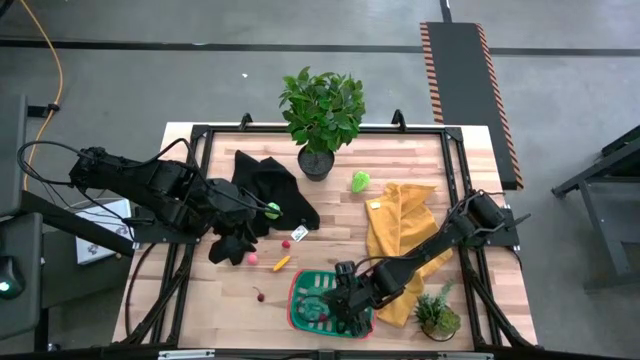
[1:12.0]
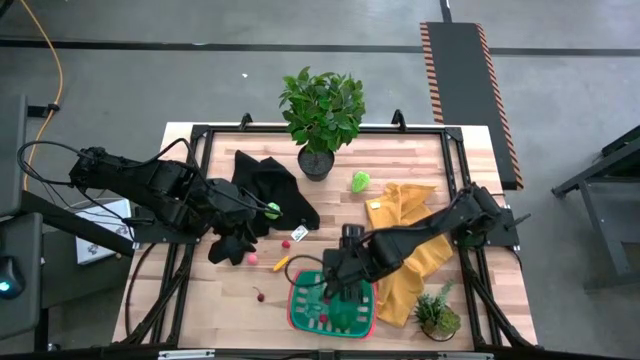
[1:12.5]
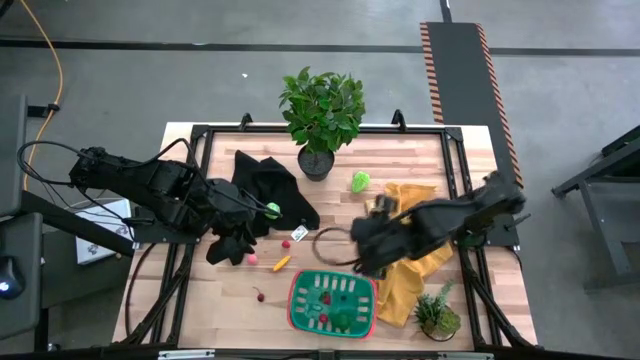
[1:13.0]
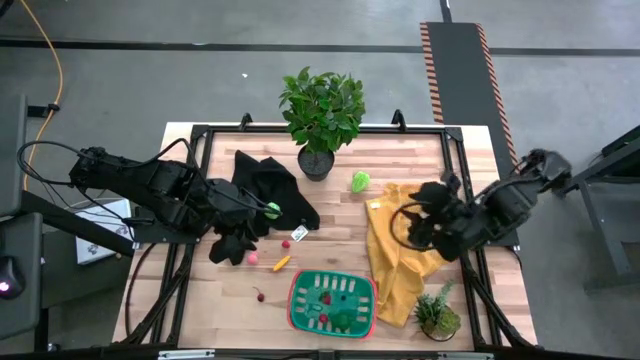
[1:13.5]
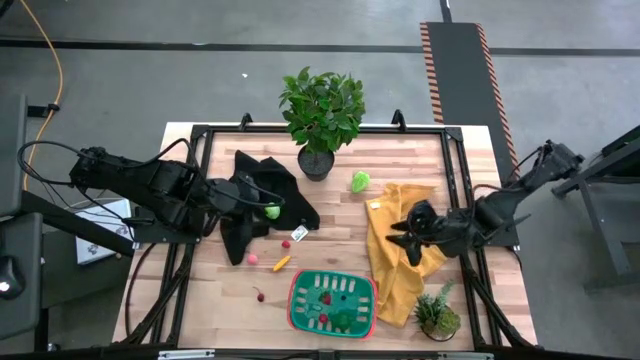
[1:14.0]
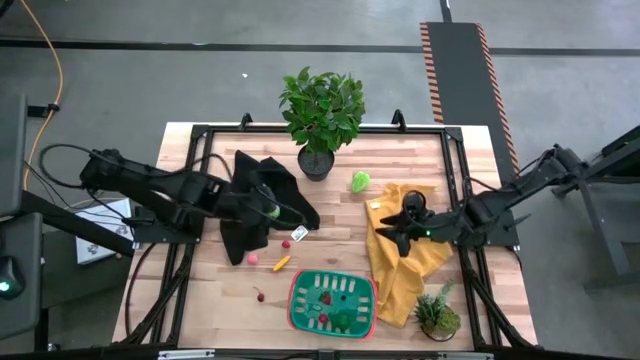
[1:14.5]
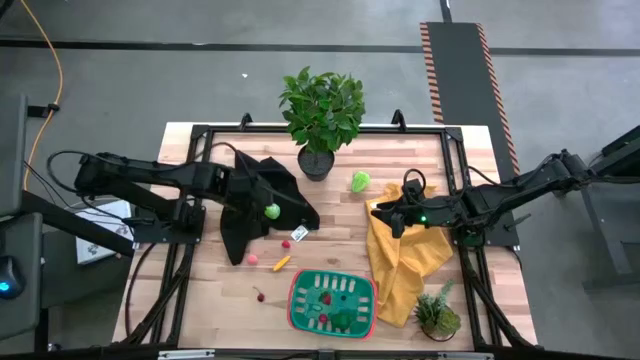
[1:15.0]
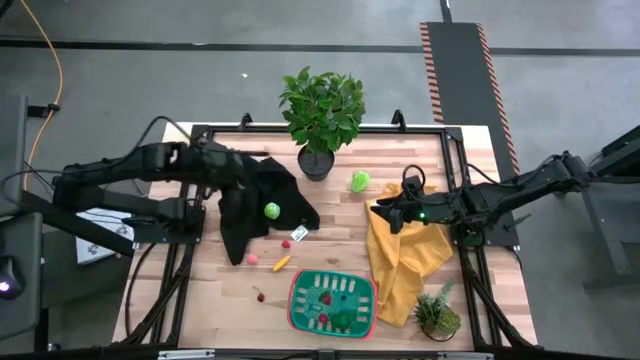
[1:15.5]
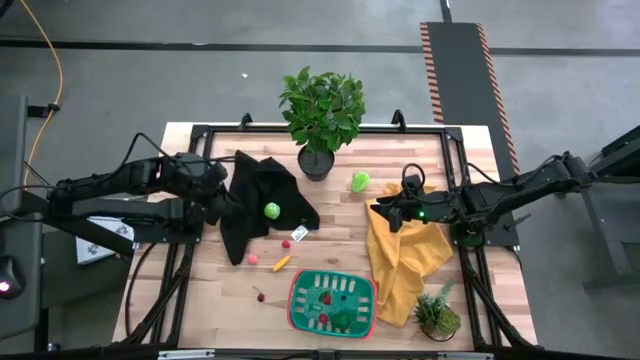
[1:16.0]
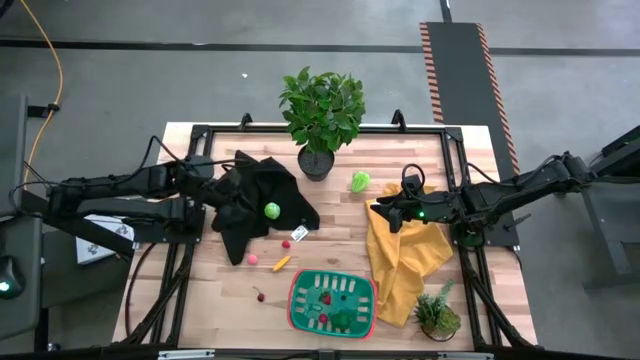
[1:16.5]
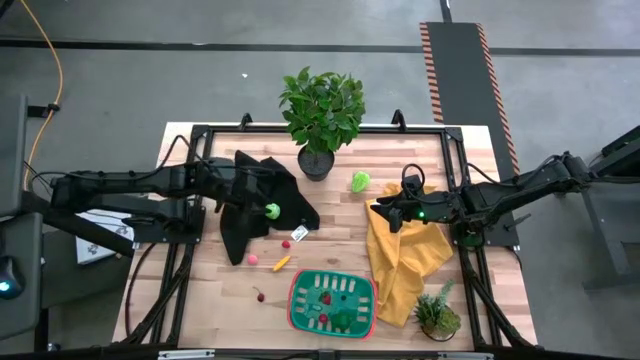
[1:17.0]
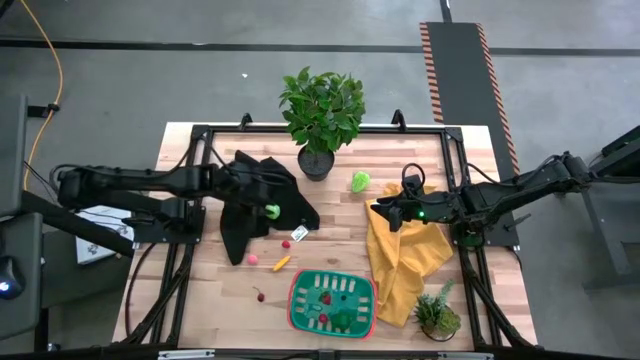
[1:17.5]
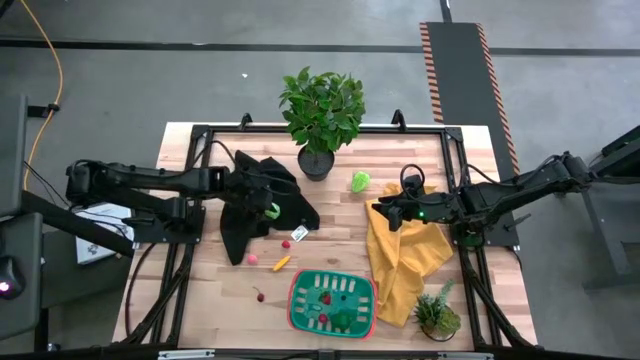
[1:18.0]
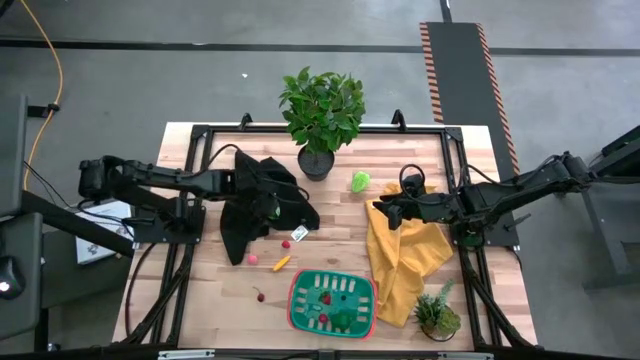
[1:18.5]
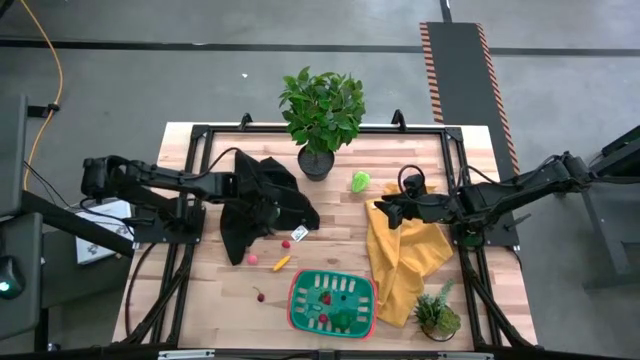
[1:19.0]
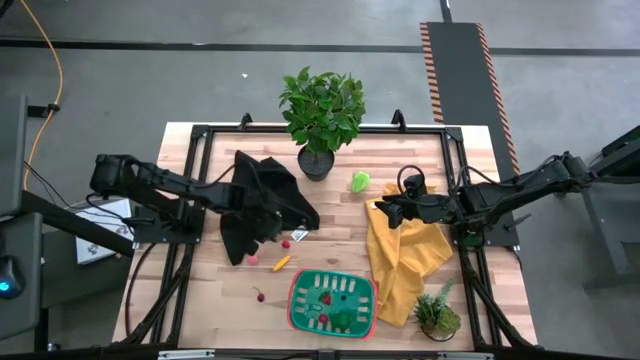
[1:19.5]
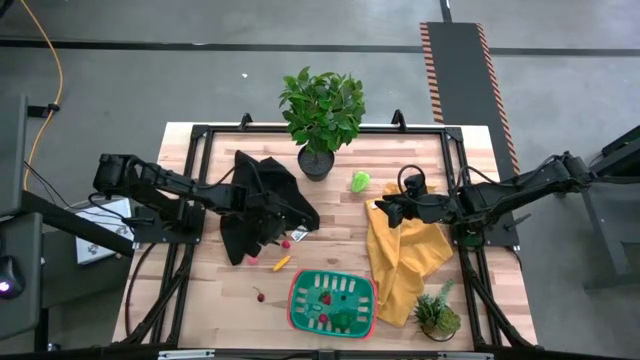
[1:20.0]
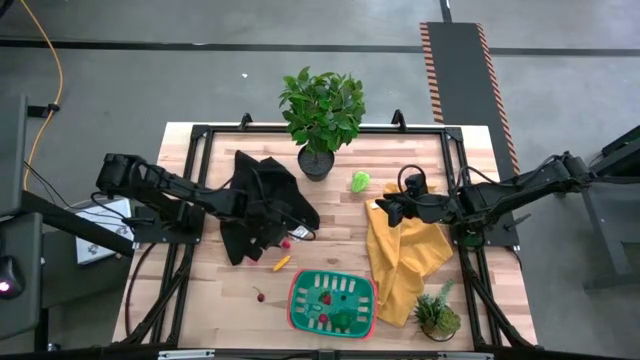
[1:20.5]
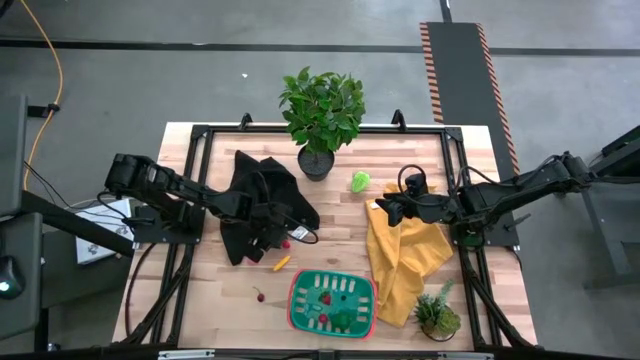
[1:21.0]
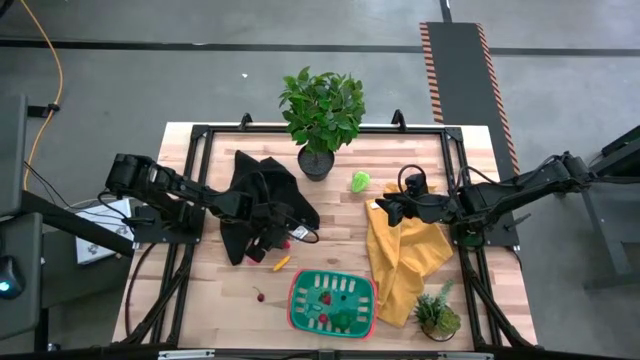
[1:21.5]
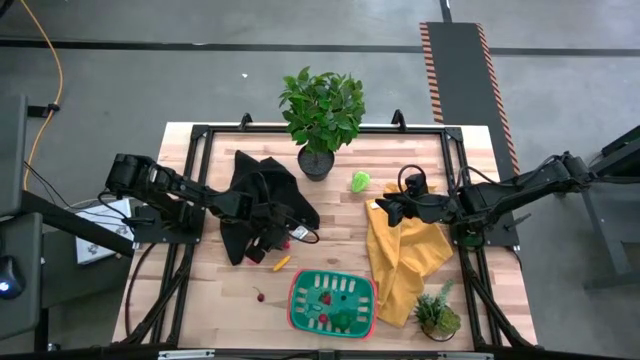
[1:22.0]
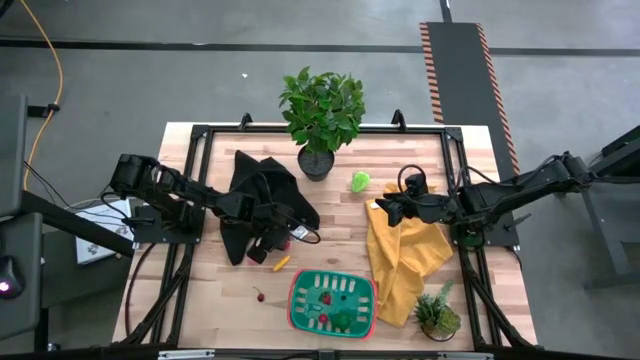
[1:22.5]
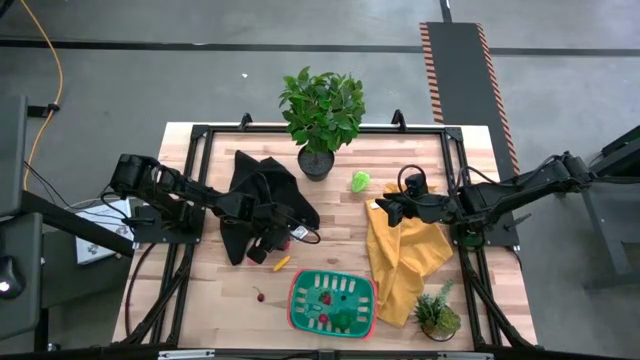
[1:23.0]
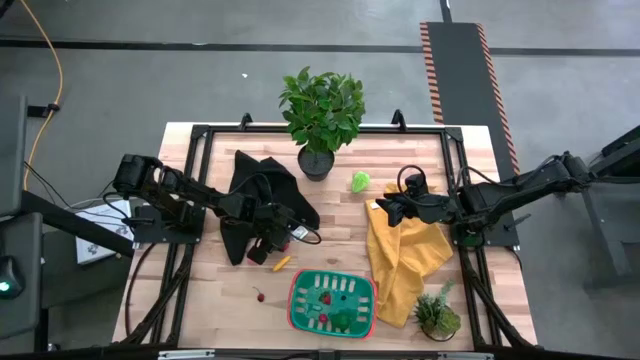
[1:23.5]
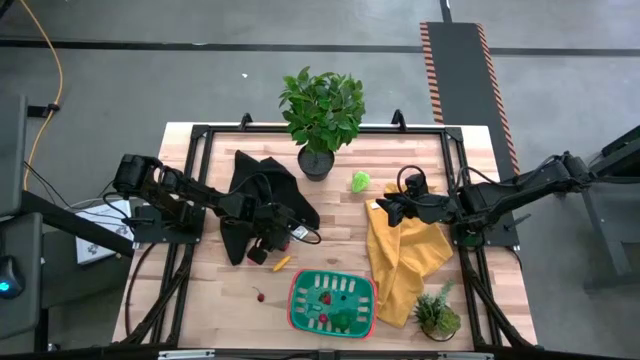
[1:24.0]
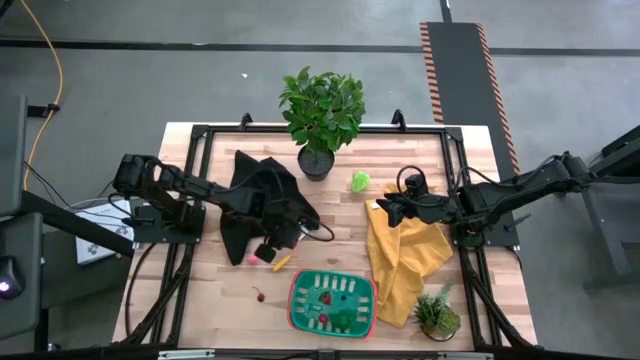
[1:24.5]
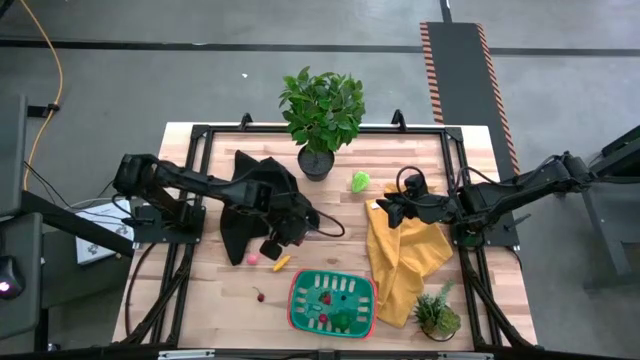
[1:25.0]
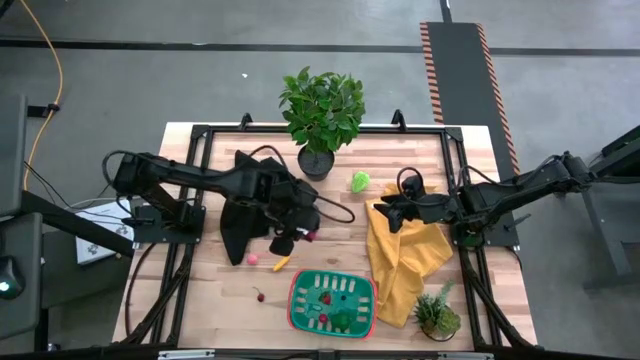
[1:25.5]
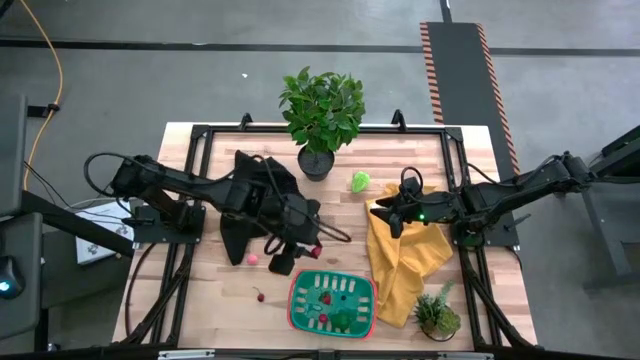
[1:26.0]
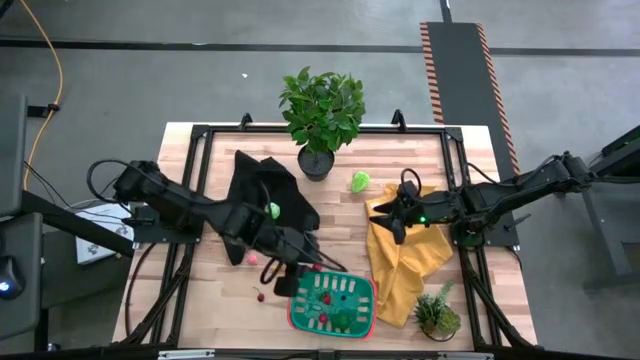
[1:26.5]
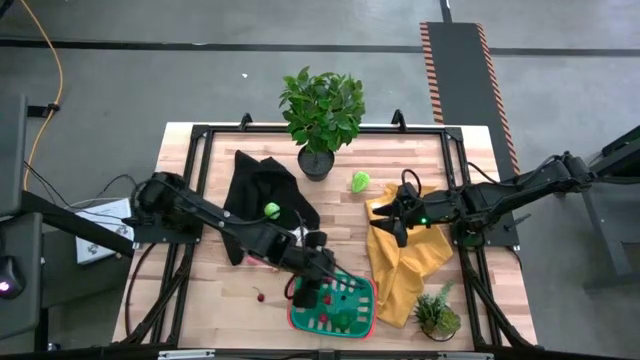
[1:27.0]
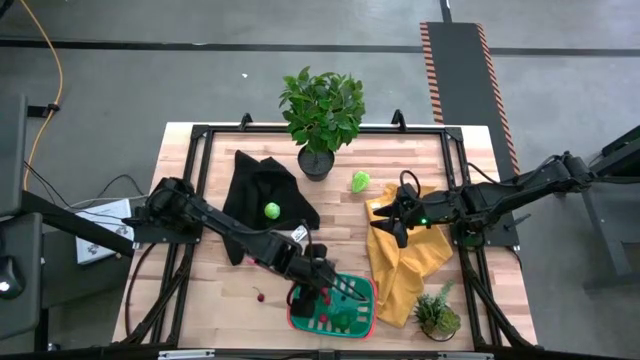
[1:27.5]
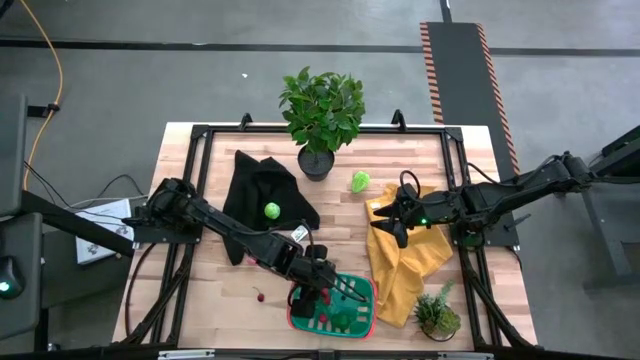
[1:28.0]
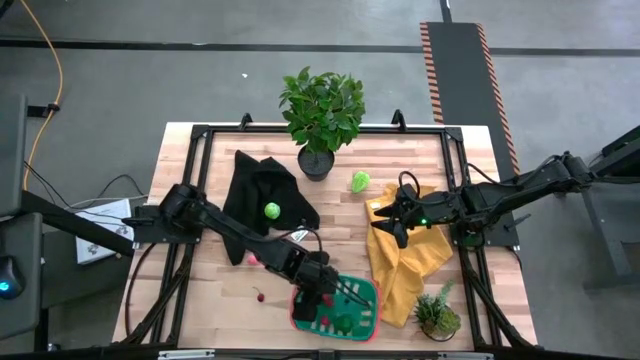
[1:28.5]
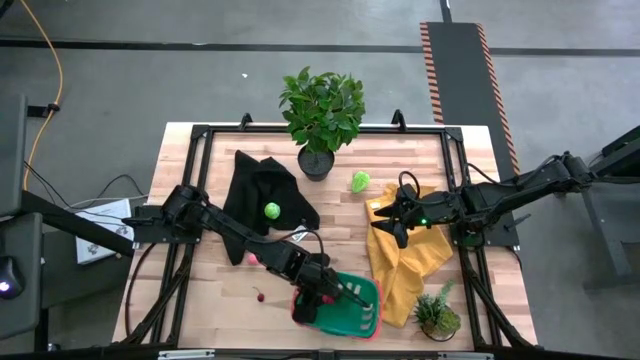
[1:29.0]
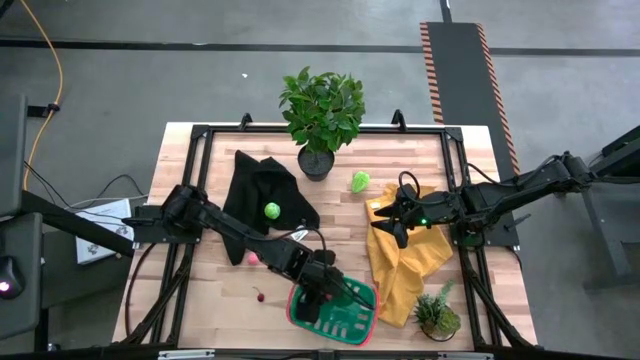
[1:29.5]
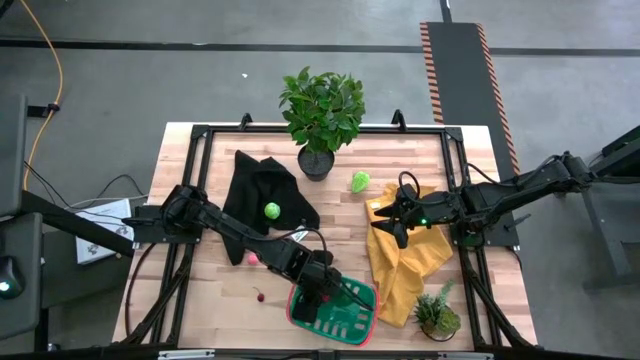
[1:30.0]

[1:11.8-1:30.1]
Task: Pick and placing Produce into tupperware
Put the red raspberry into the blue bin

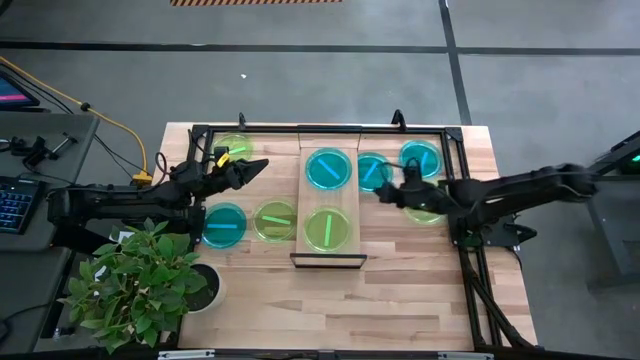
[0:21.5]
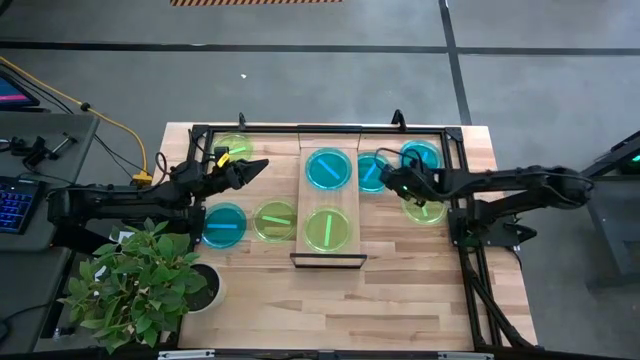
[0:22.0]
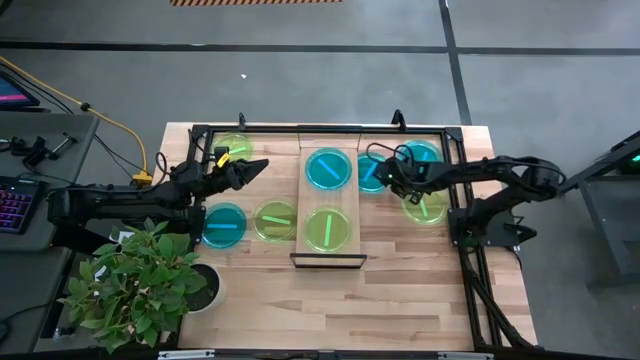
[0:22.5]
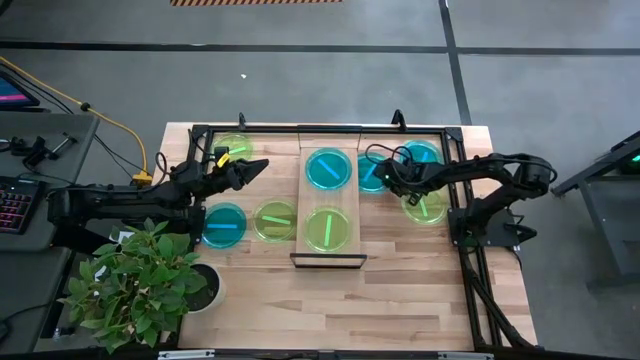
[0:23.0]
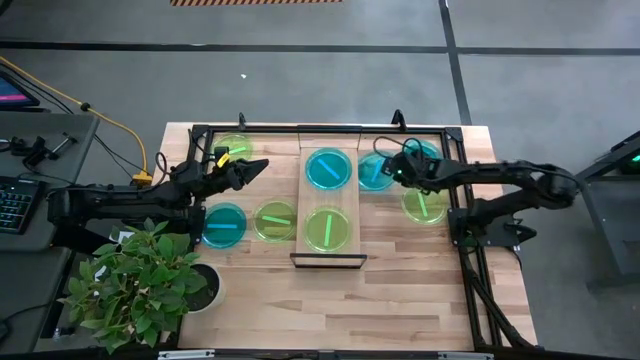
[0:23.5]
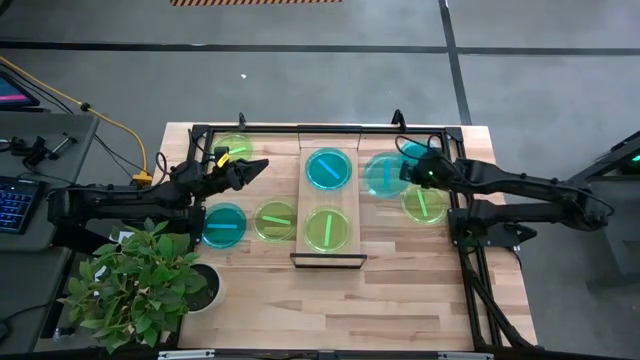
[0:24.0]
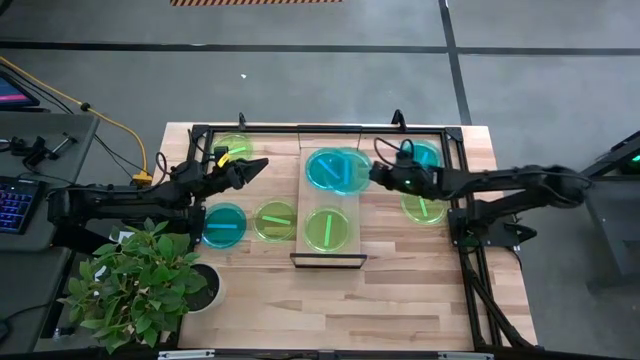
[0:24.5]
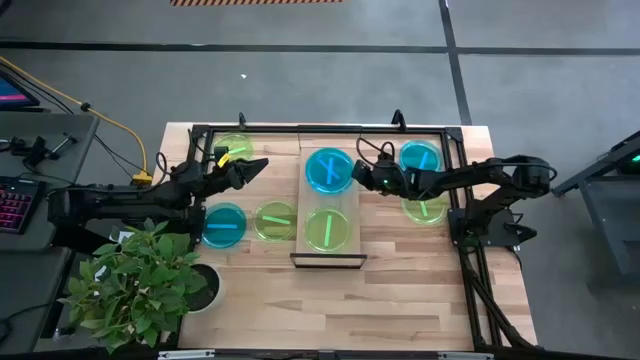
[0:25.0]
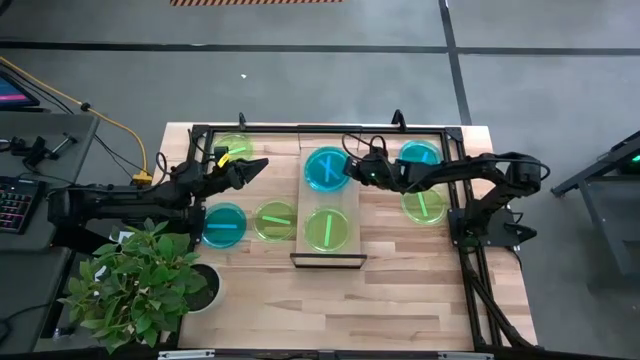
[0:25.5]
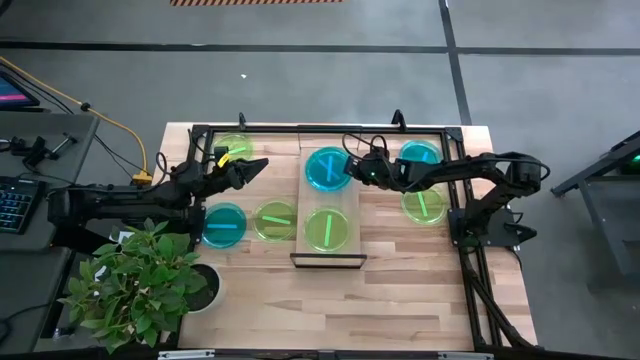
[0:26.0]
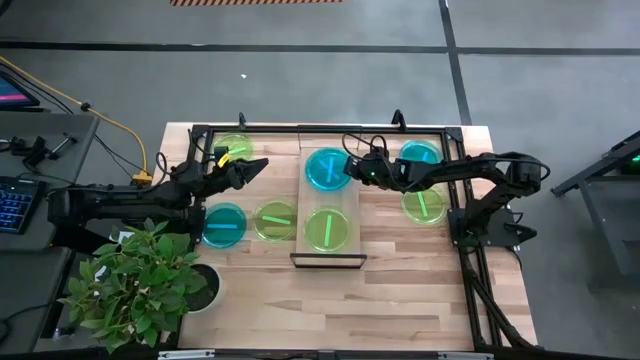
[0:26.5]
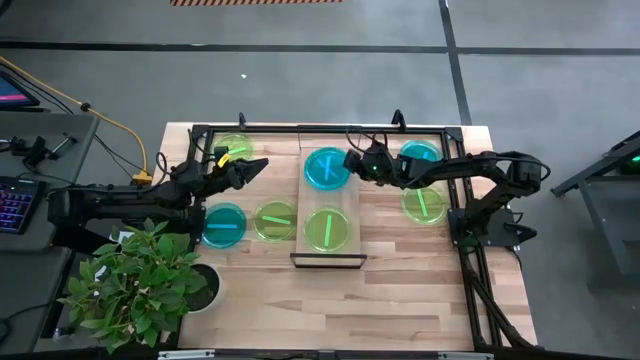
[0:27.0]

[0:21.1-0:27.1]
Task: Place and stack plates onto a shelf
Stack the blue plate on top of the blue plate on the shelf
